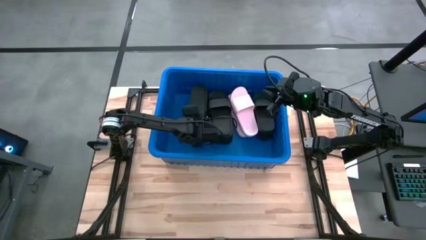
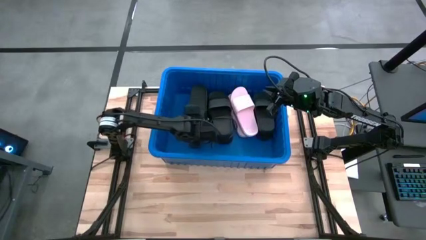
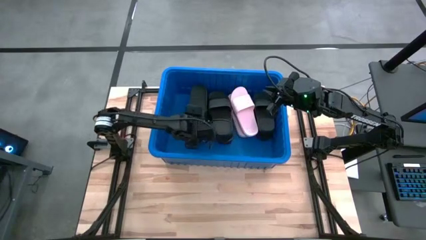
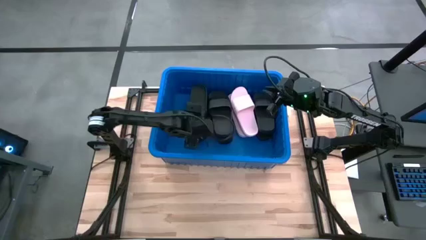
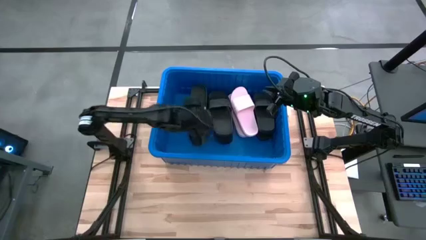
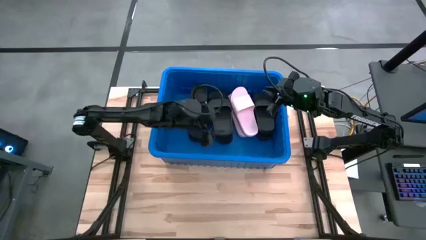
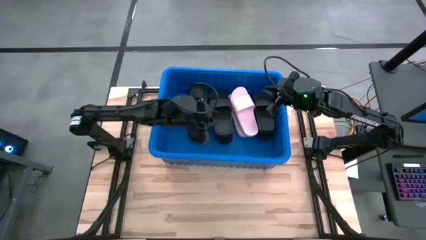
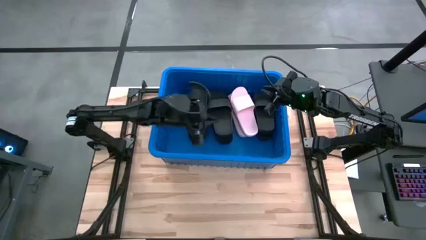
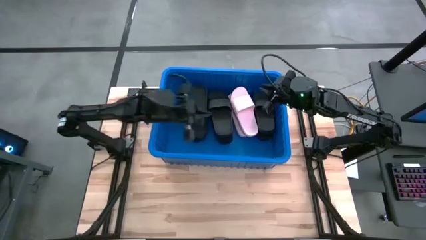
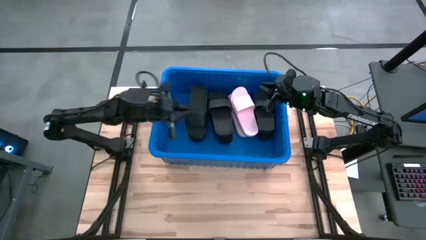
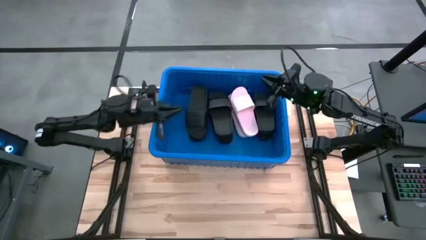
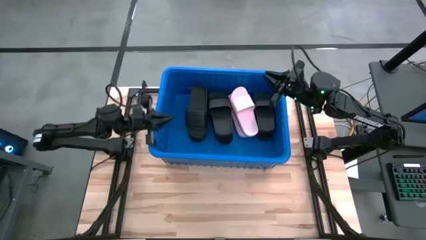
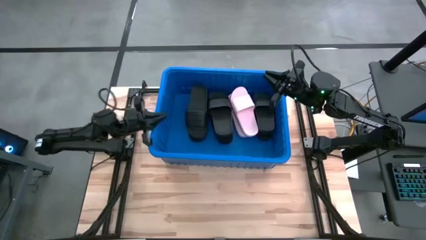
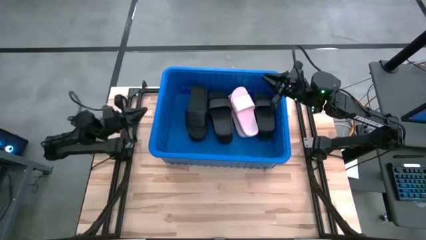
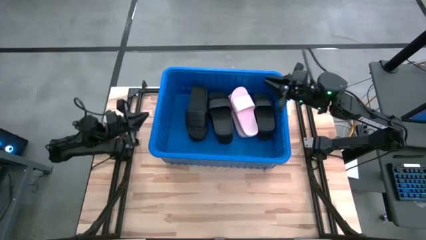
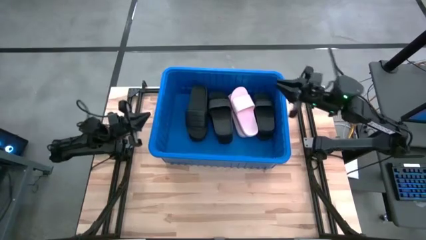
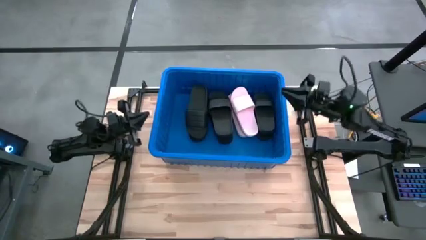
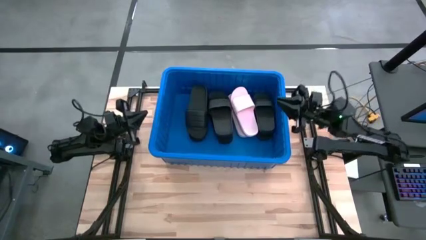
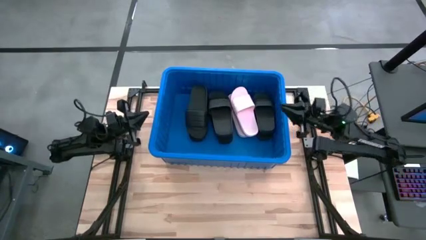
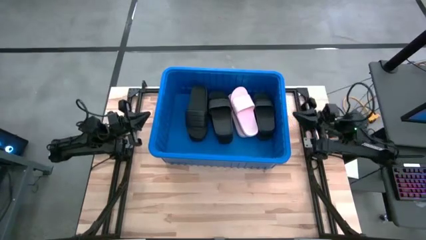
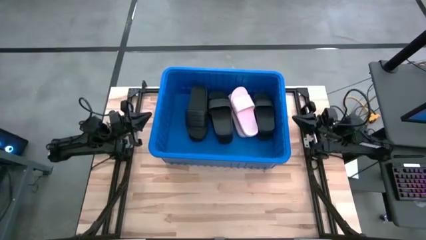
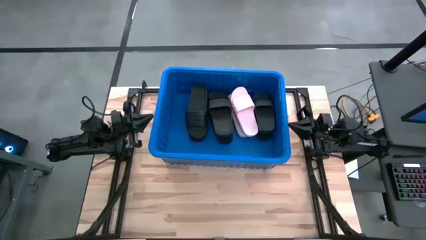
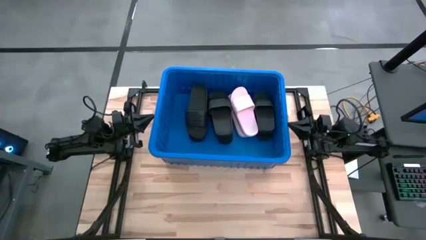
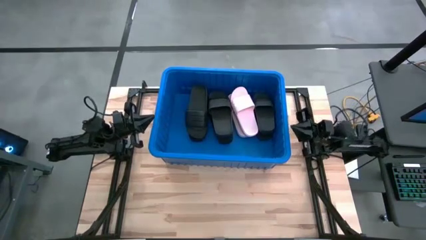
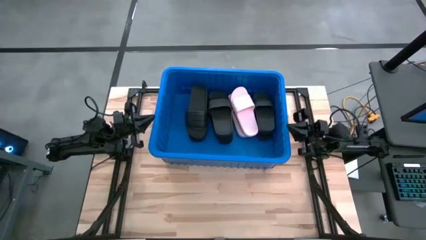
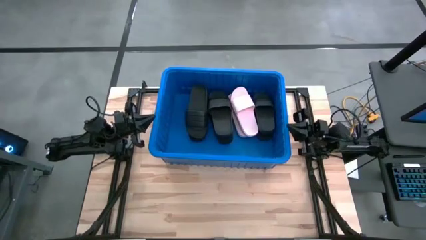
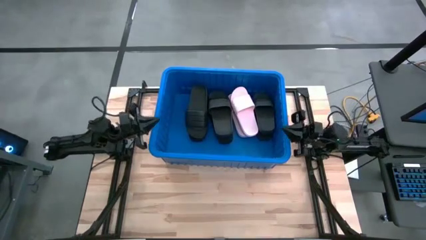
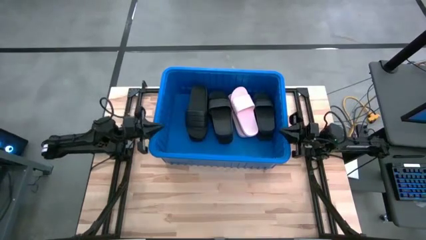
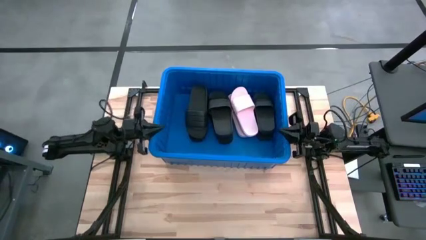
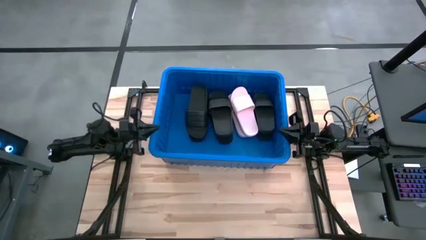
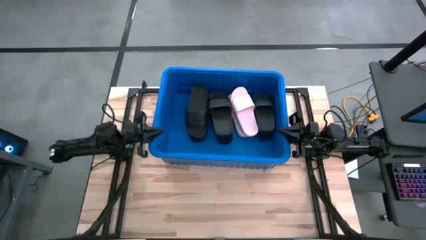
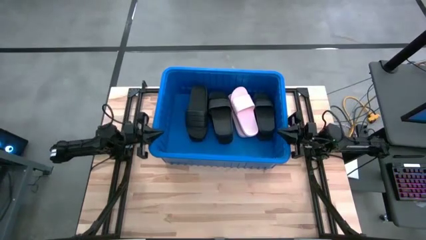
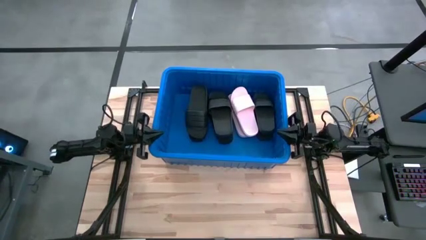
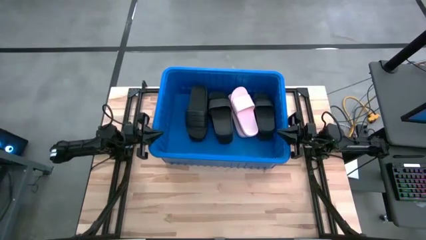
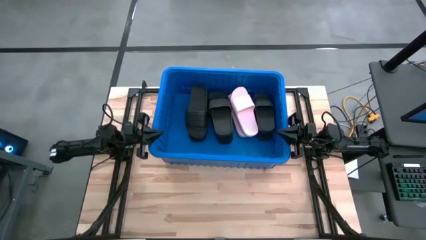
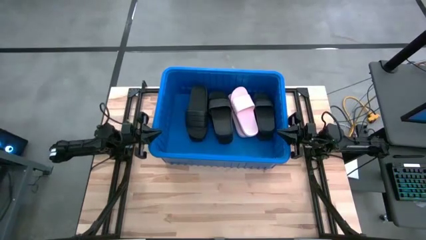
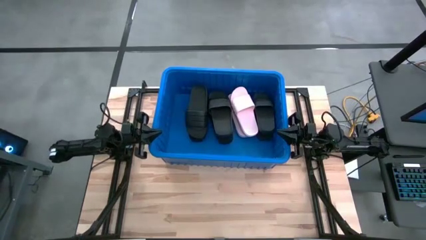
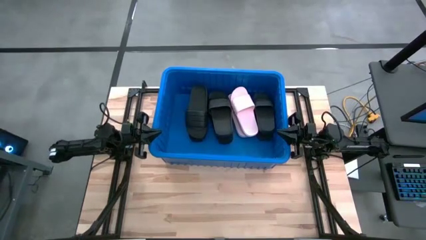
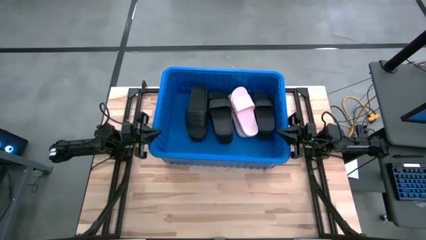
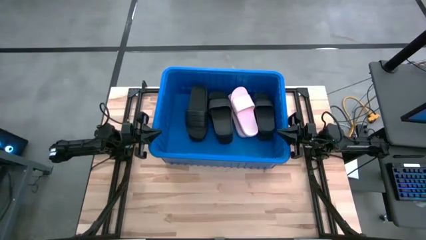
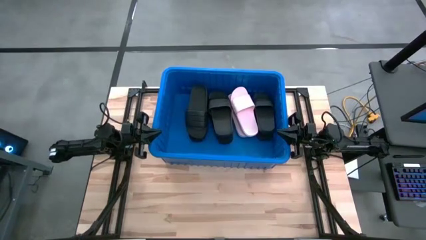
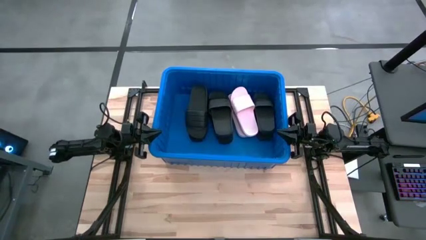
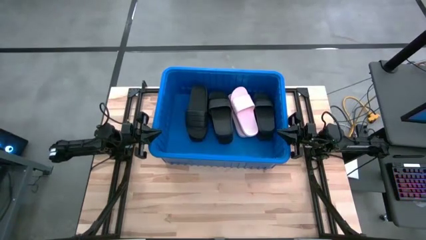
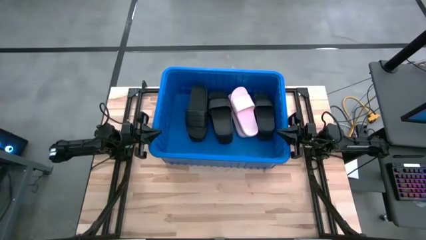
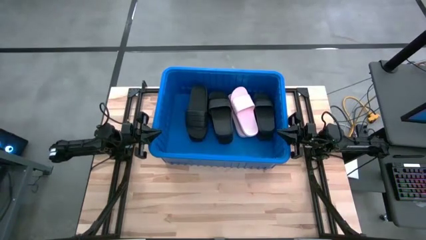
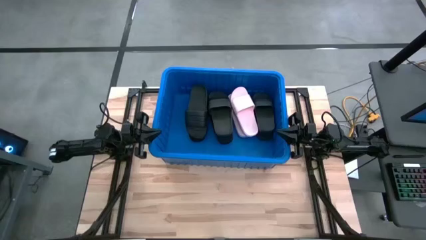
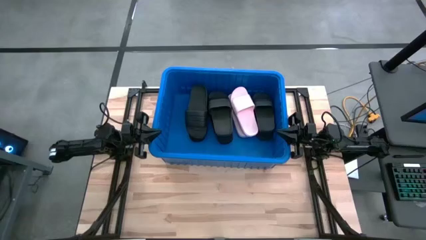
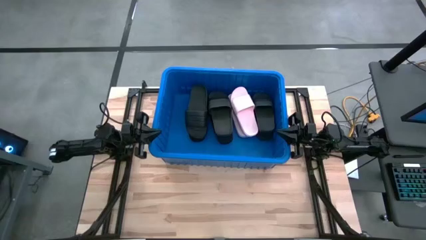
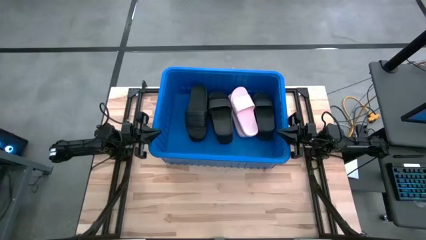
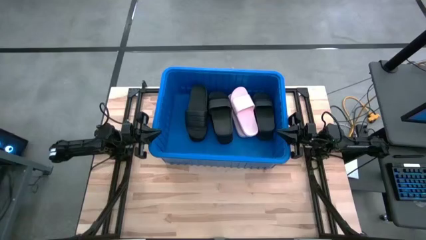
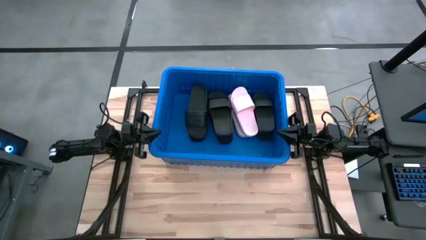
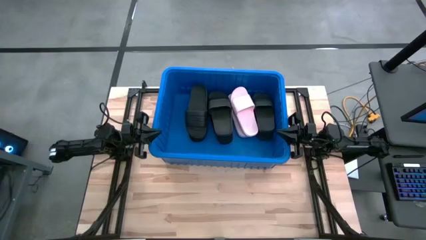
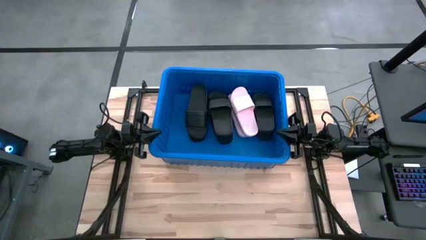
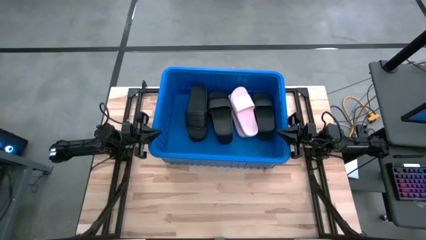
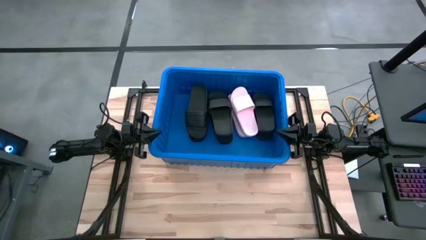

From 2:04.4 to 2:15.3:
Task: Pick and place slides into bin
Return to Home Position
